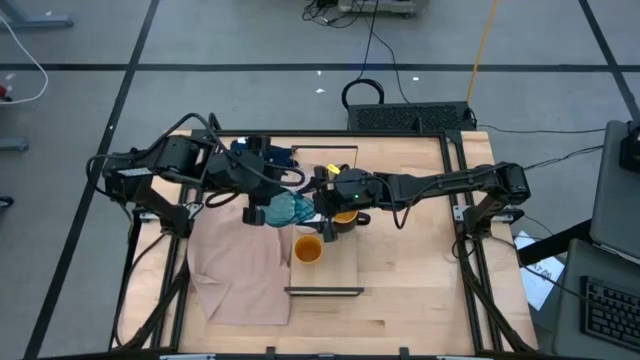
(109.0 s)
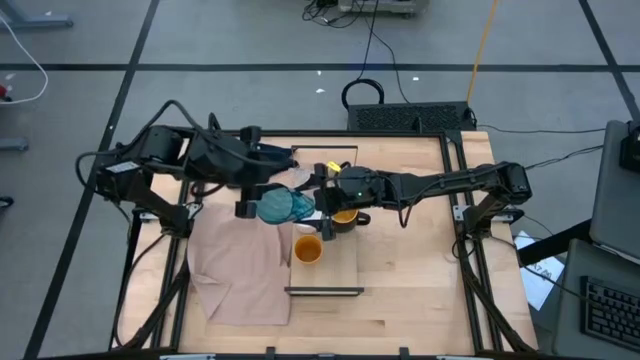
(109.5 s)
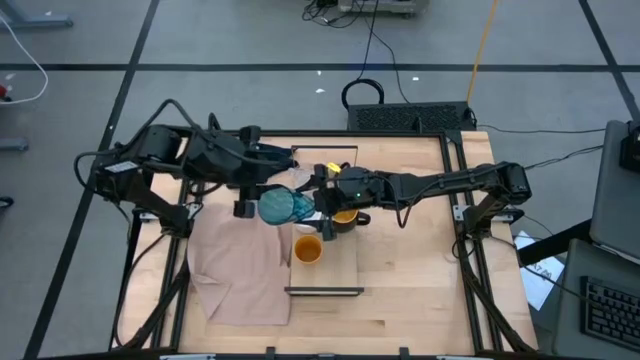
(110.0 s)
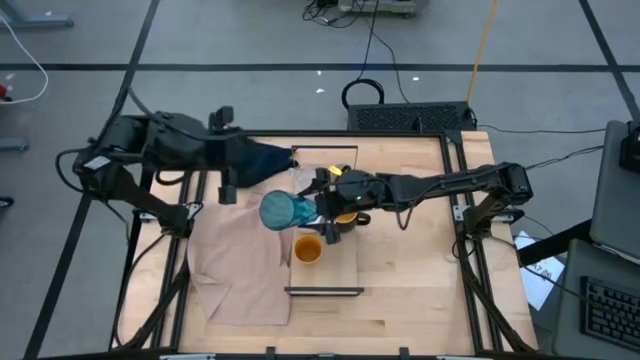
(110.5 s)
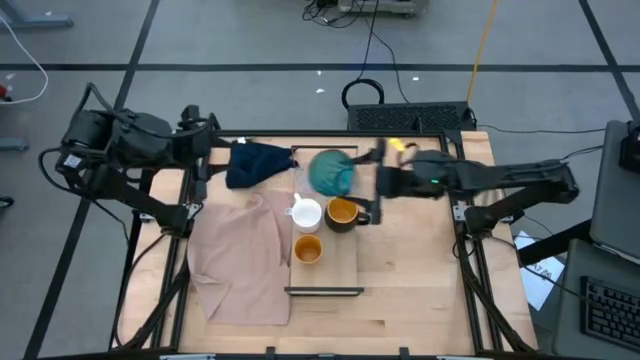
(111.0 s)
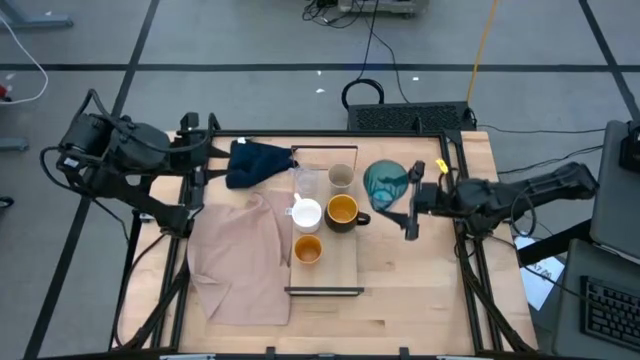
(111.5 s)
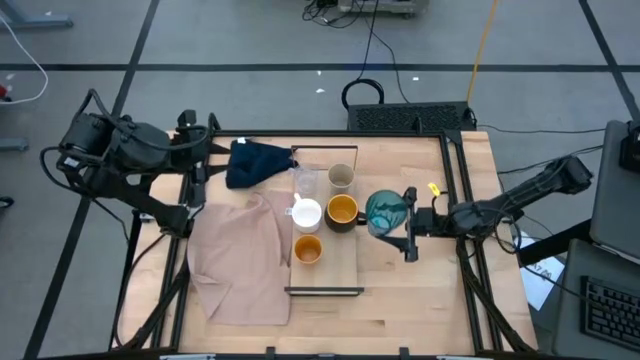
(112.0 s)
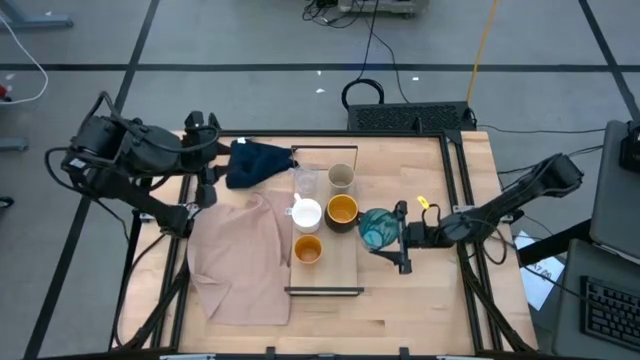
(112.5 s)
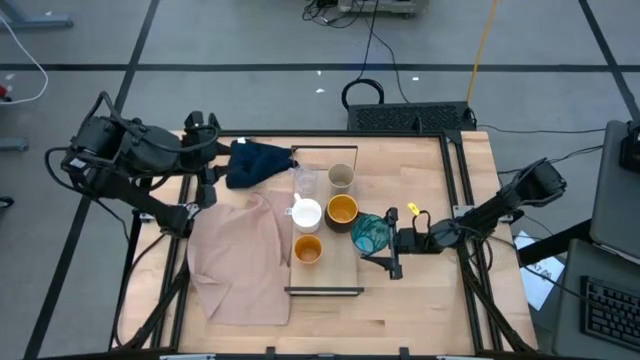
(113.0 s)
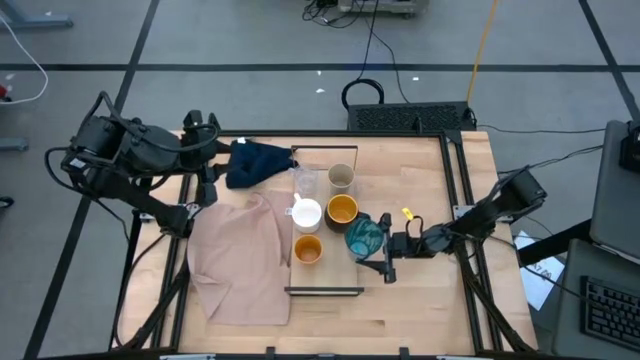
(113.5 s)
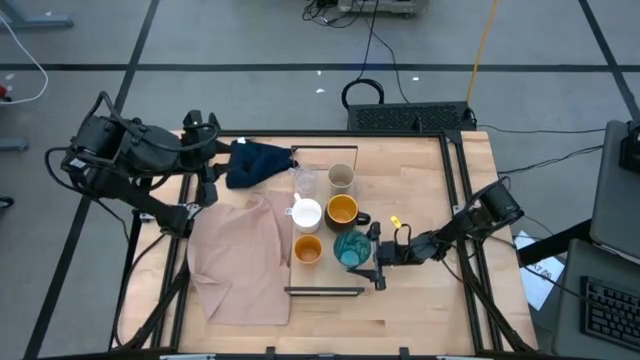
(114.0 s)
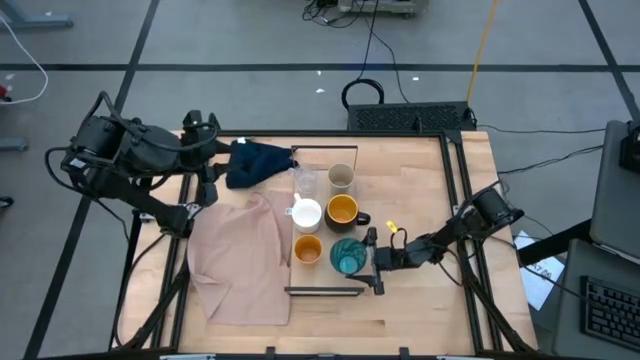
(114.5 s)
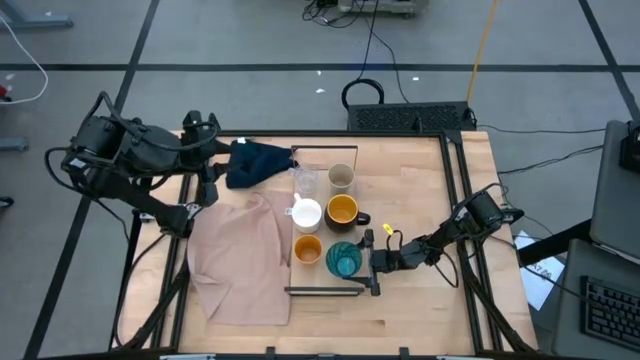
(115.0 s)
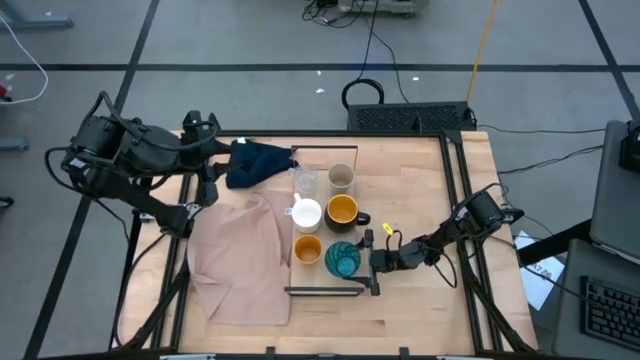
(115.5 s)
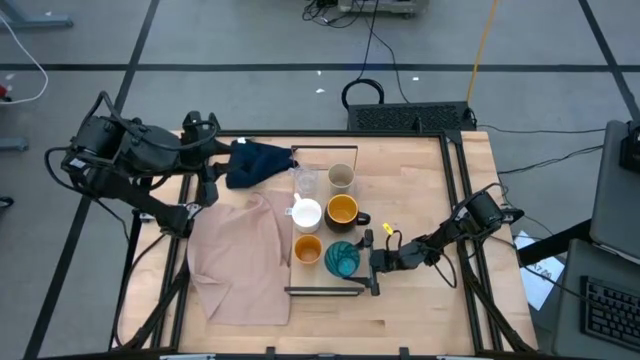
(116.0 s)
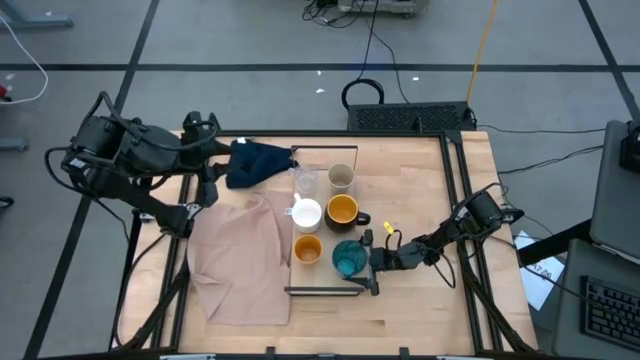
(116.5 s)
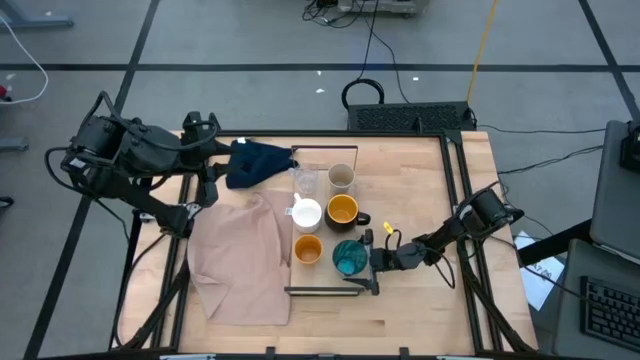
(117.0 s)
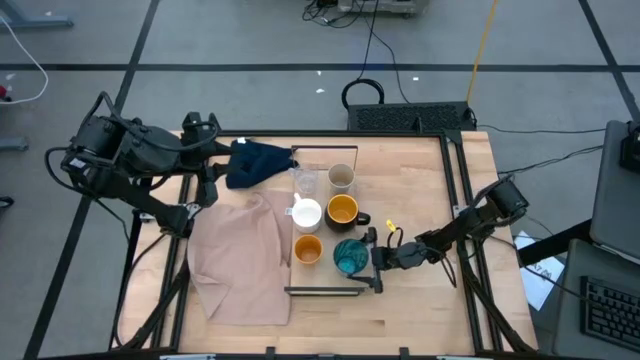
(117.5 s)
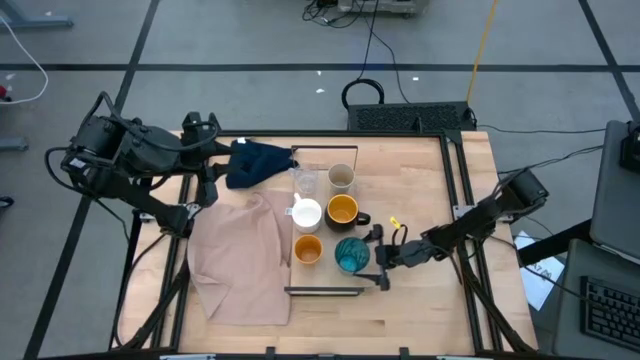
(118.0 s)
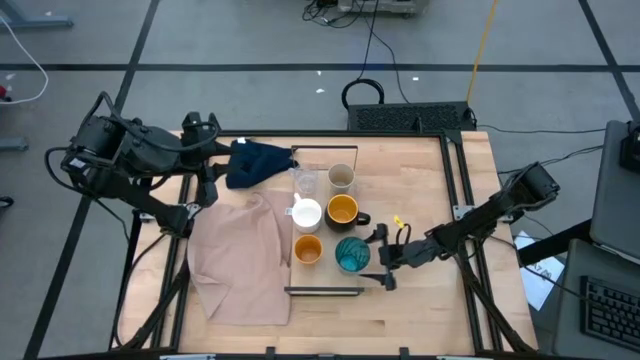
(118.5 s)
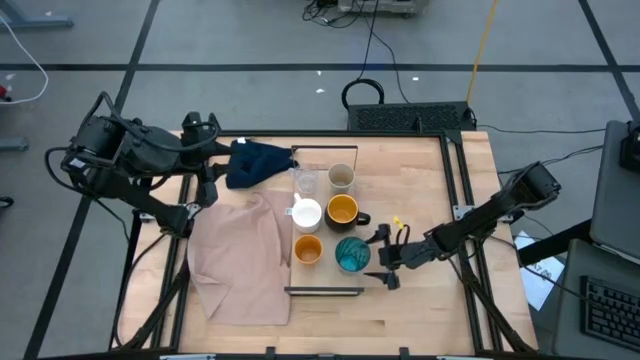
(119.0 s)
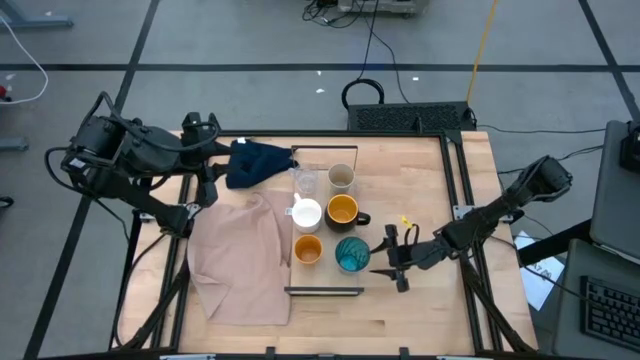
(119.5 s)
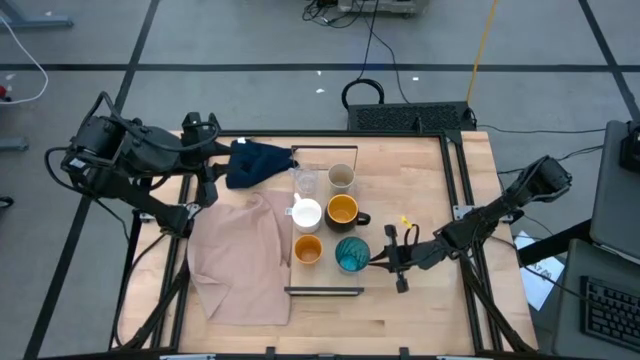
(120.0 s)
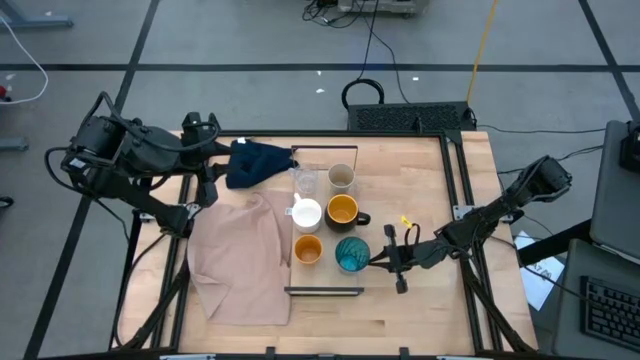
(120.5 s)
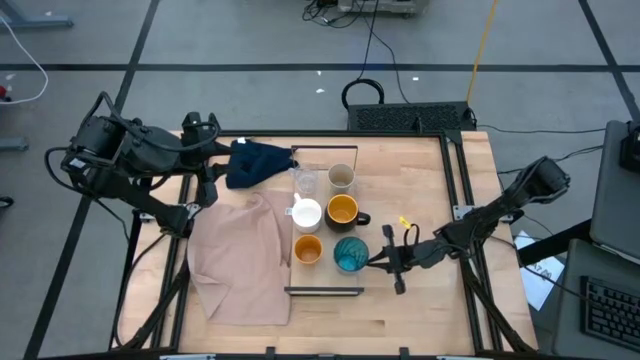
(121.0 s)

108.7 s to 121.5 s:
Task: Stack small to large cups/mugs on shelf
Put the transparent blue glass on the shelf

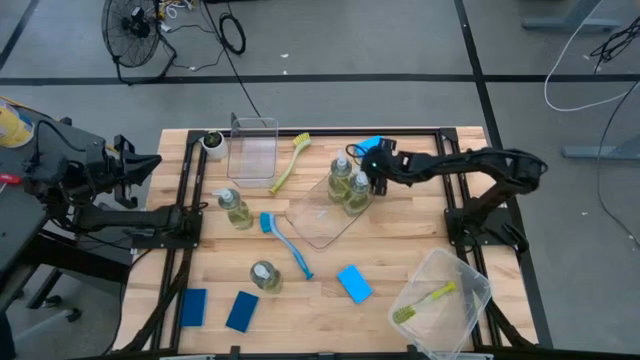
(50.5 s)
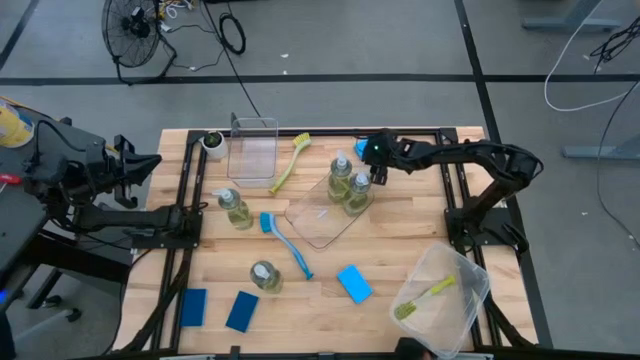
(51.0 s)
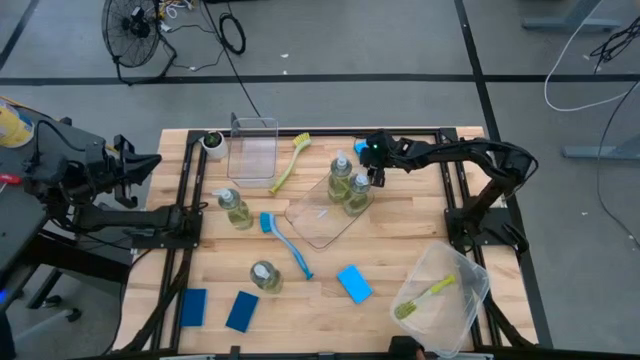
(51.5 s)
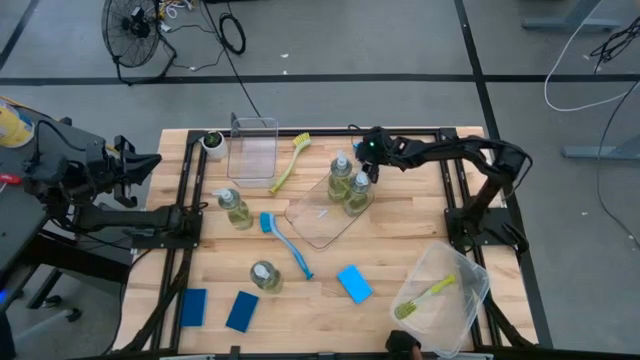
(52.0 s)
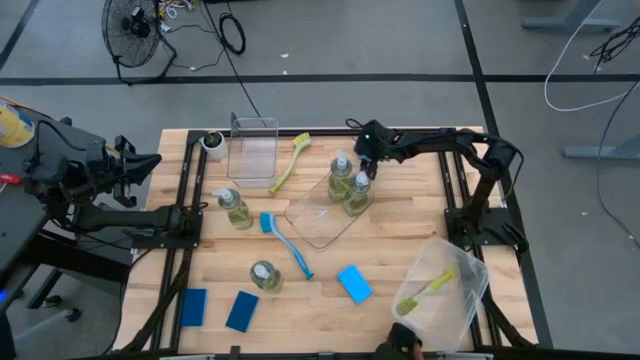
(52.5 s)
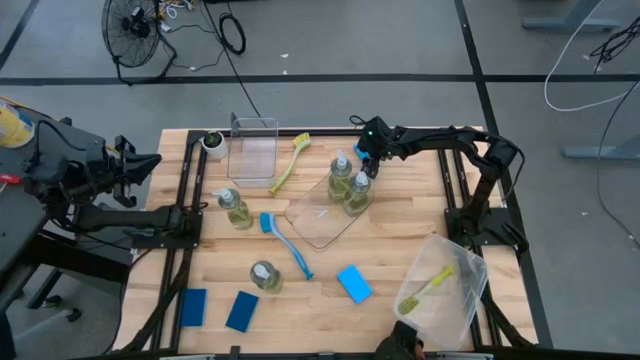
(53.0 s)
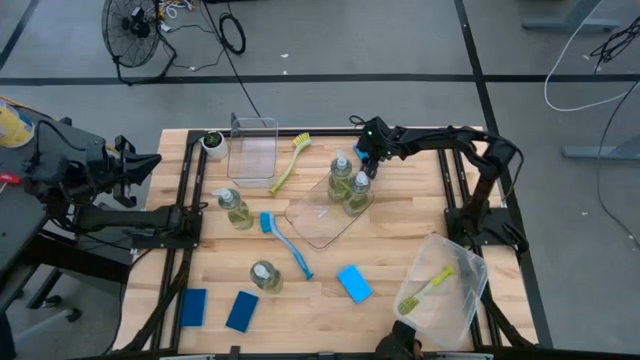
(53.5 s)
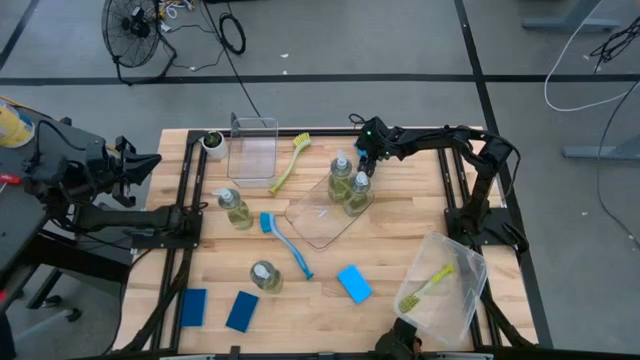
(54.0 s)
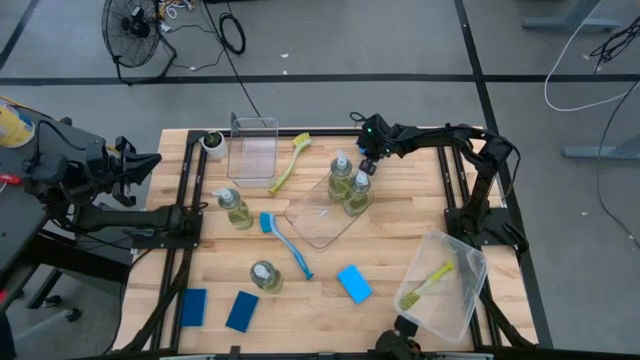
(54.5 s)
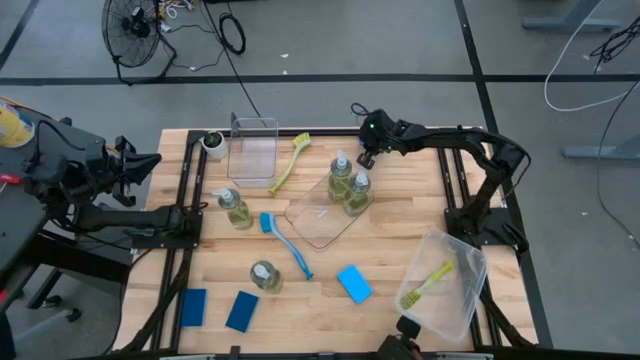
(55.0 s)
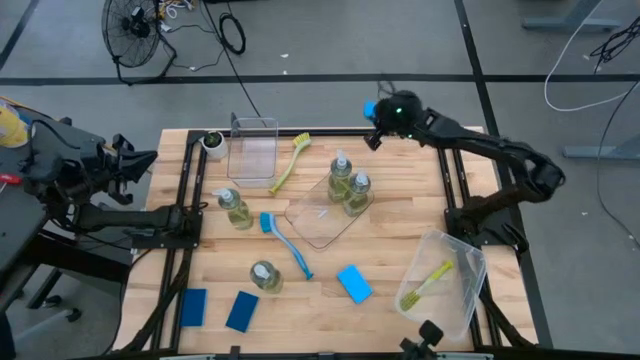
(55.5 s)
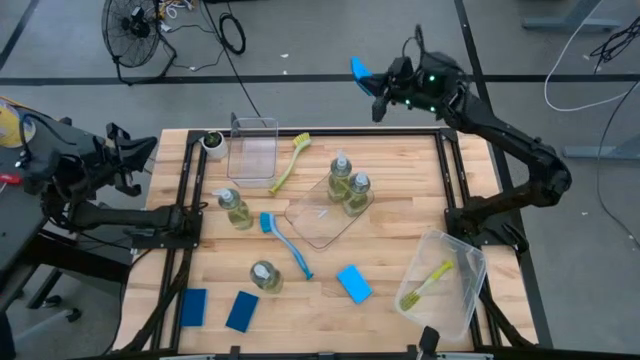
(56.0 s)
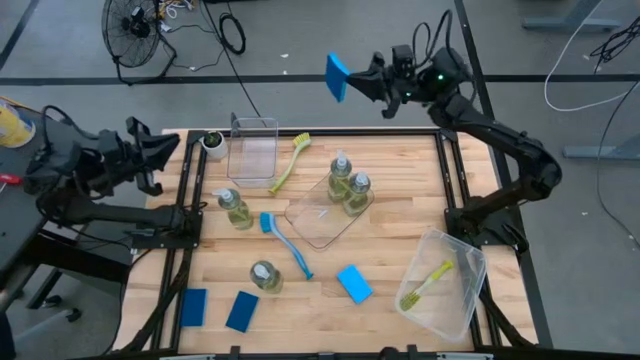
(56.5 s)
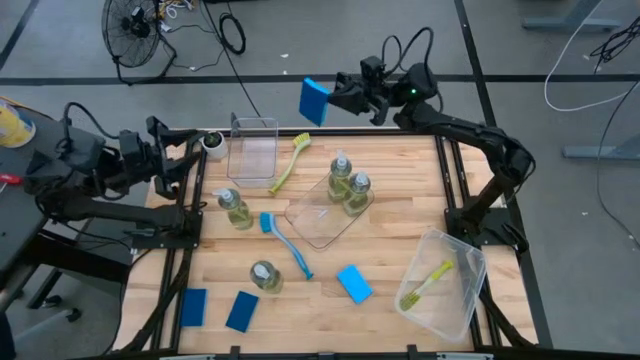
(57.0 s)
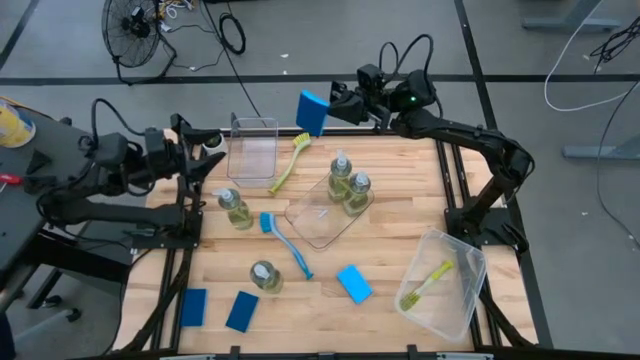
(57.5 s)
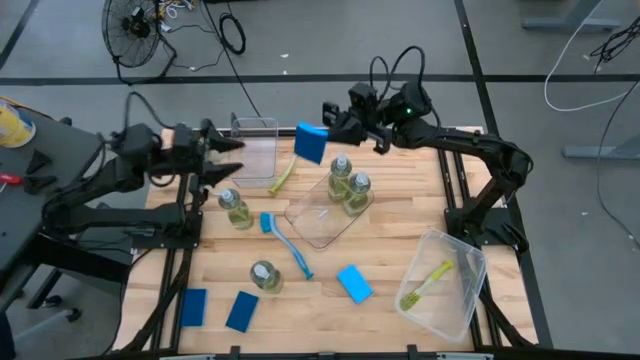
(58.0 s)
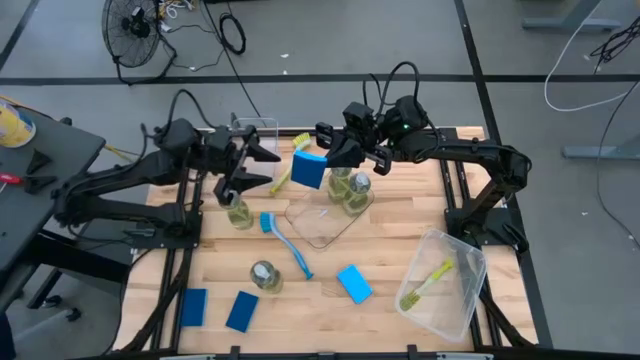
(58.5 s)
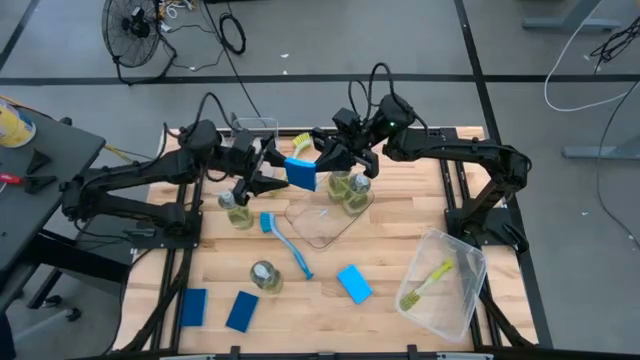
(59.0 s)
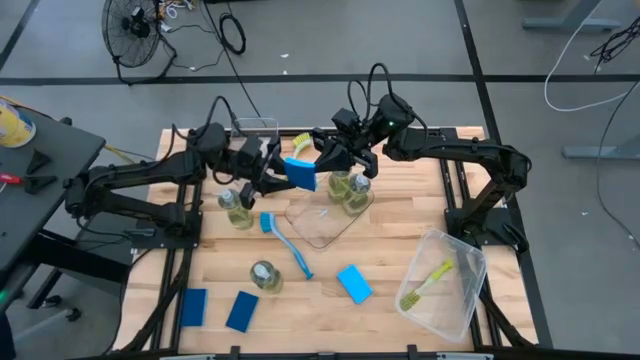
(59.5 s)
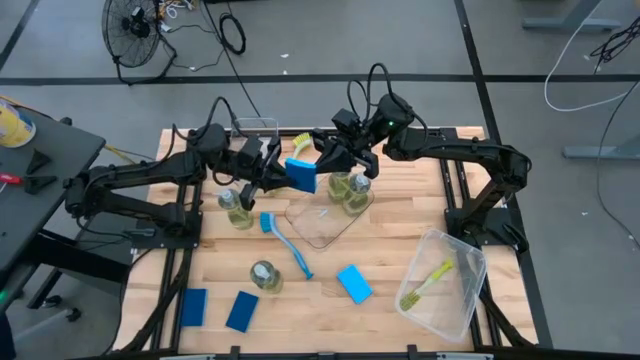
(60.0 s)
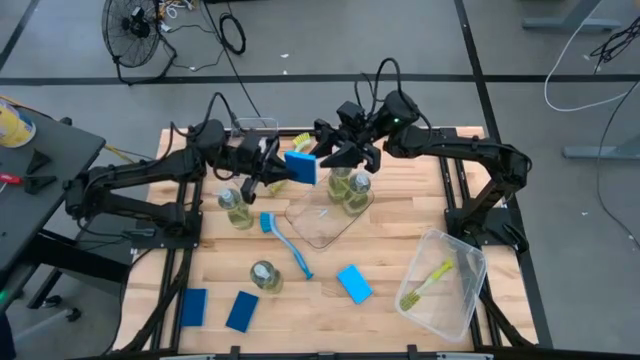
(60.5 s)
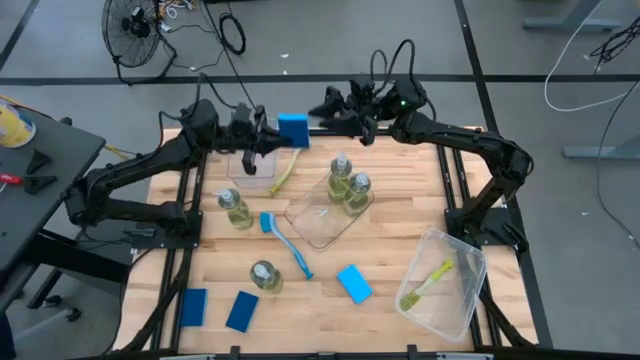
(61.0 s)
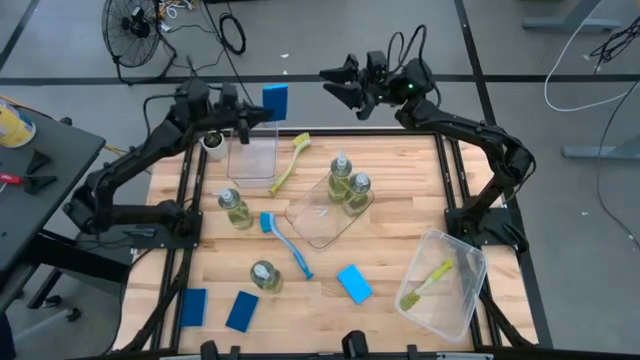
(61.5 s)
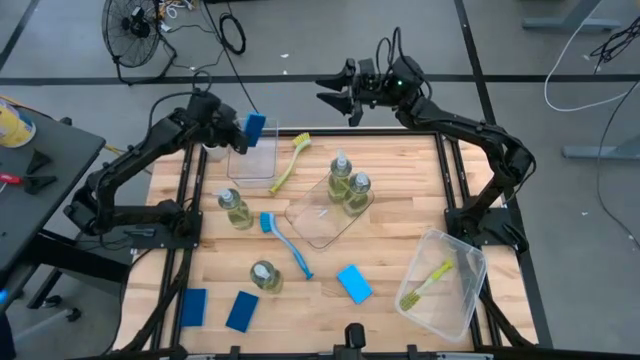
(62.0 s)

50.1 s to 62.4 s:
Task: Pick & Place Kitchen Sink Supplies
Put the blue sponge into the top transparent bin
